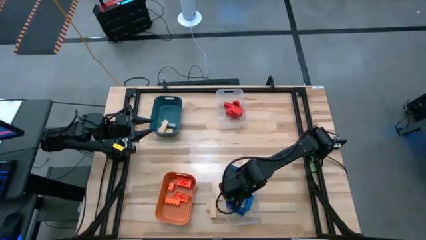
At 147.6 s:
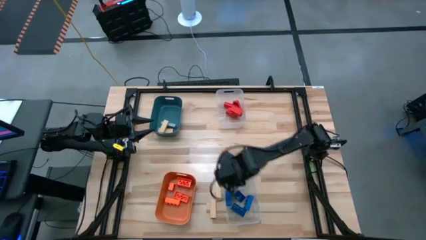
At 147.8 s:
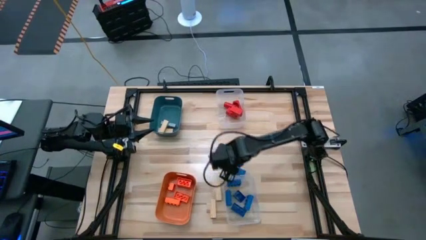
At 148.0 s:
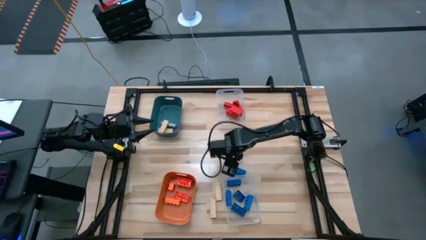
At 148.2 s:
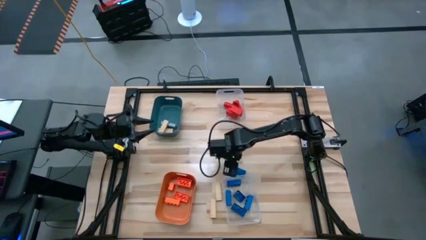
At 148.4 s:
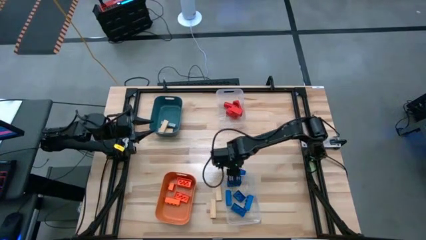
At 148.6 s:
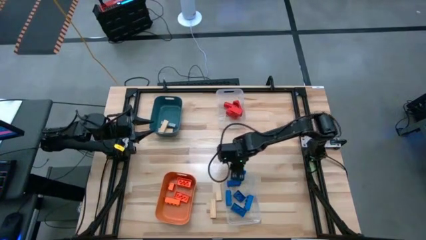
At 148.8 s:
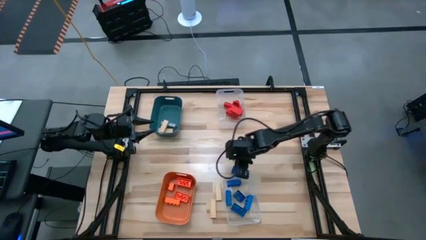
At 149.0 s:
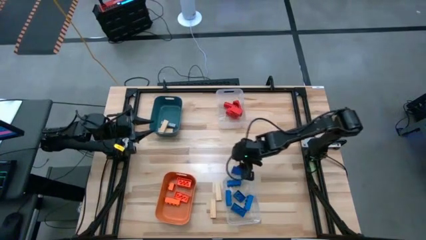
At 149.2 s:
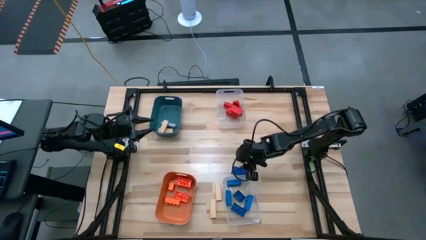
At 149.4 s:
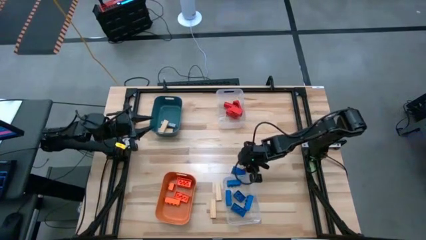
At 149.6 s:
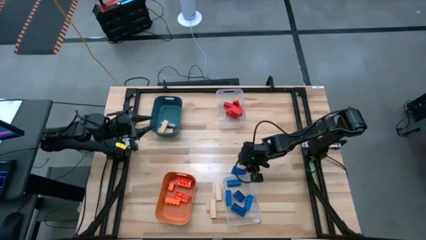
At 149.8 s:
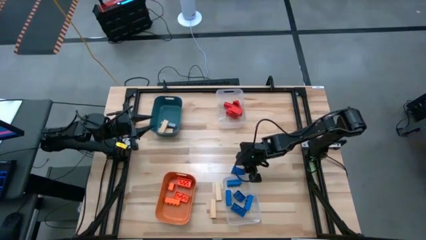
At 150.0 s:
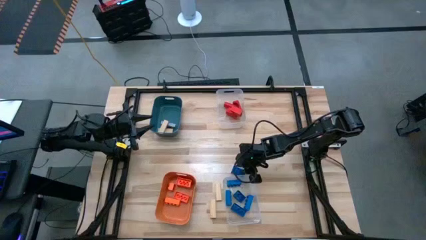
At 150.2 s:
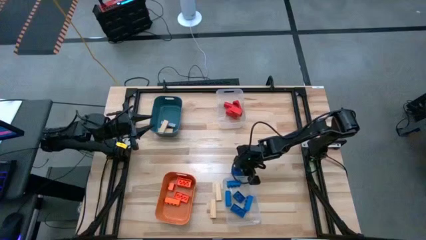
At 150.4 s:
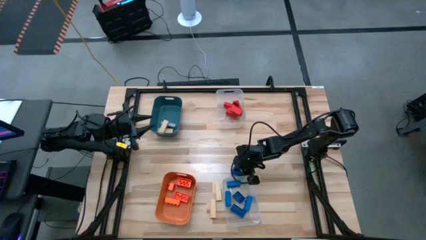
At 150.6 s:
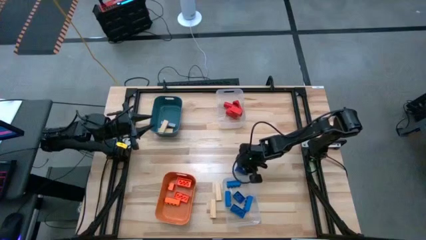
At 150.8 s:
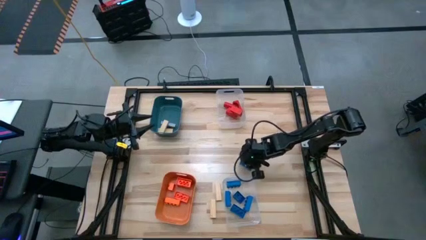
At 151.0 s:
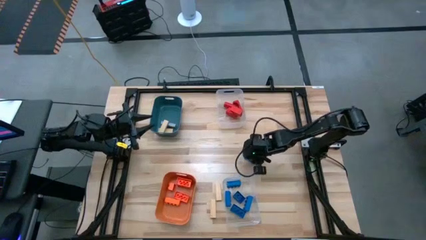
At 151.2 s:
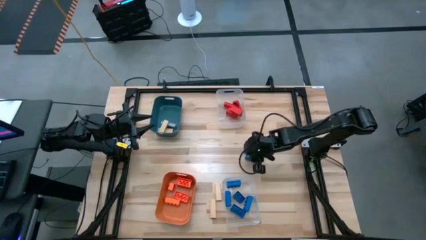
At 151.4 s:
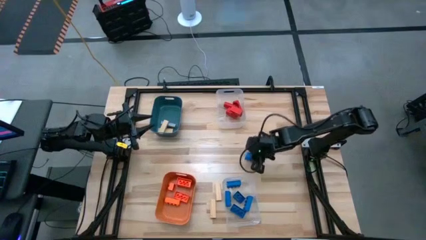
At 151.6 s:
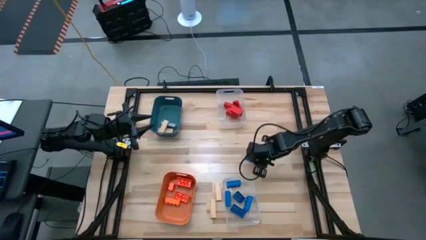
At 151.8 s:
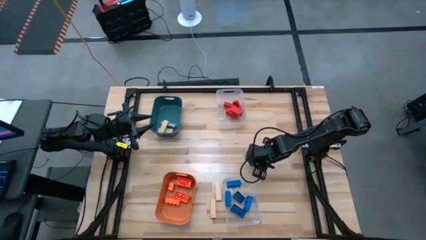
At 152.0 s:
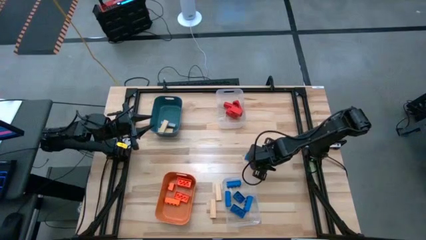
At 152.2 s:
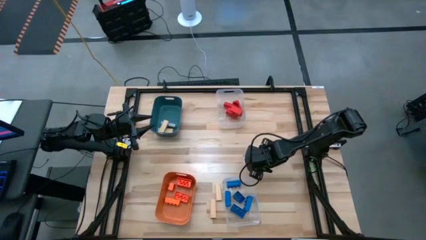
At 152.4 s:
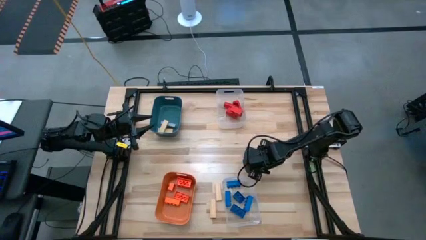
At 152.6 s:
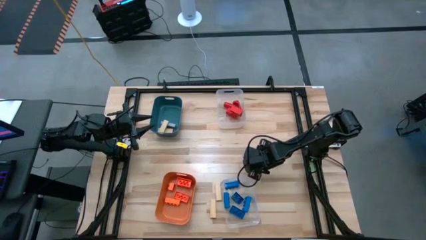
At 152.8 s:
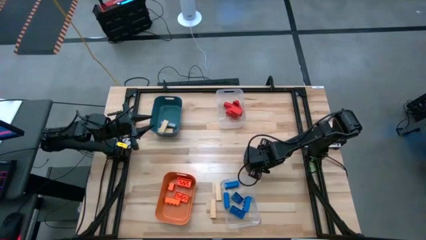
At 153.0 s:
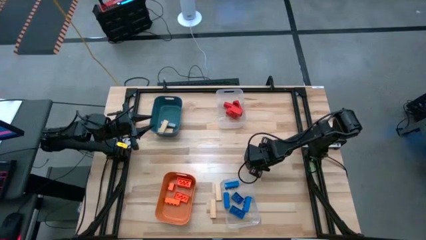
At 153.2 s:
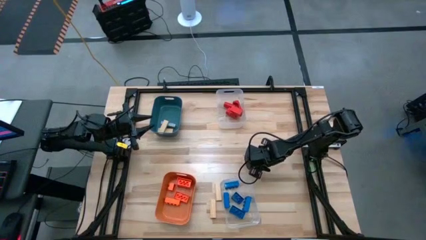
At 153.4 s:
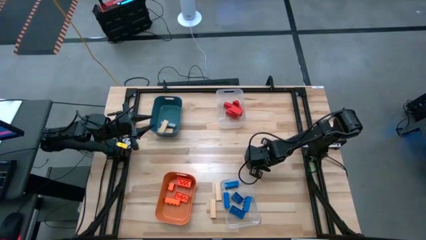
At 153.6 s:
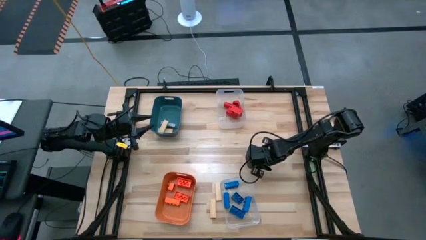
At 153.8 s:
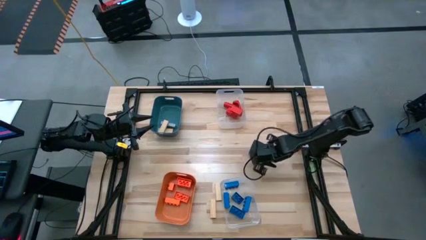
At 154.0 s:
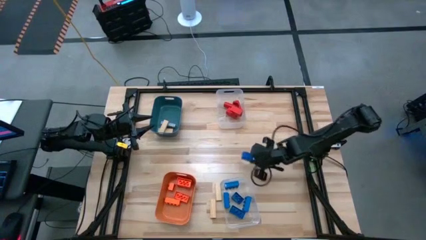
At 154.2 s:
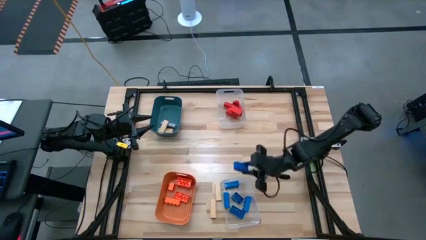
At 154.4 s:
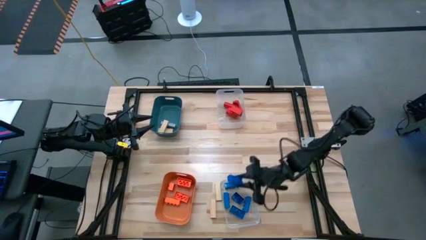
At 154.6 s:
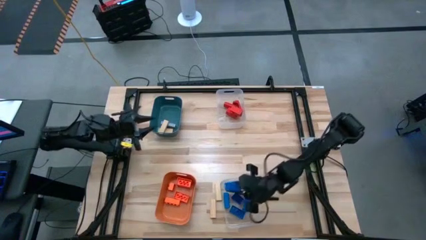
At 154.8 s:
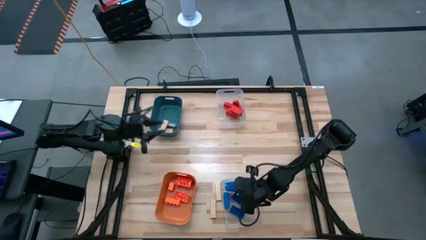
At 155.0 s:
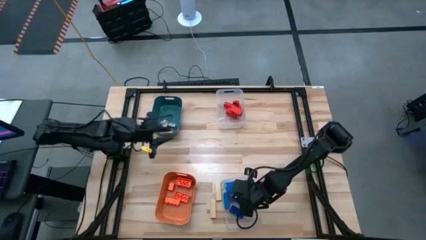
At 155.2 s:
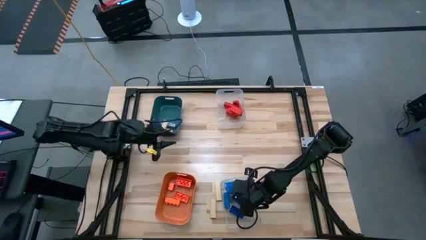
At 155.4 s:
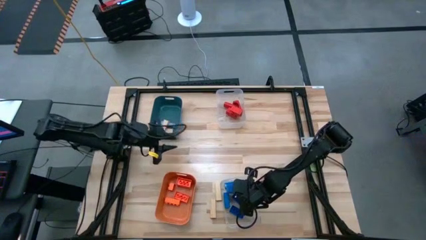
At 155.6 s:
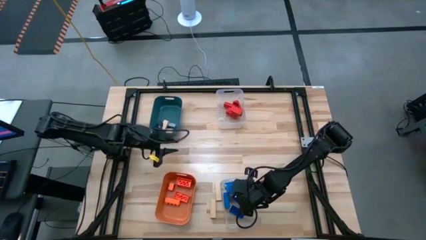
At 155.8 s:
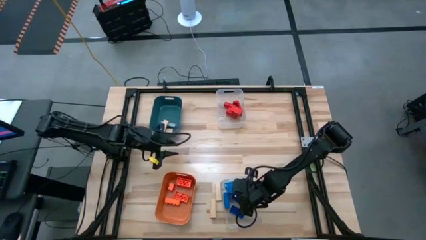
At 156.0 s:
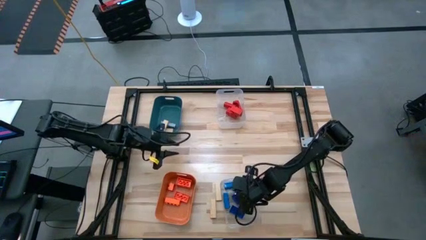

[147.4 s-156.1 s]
Task: Sort blocks
Put the blue game piece into the bottom transparent bin

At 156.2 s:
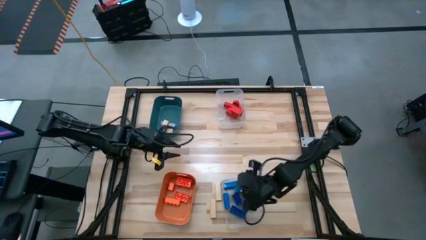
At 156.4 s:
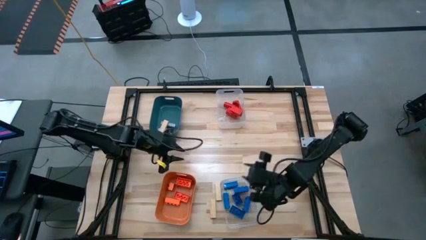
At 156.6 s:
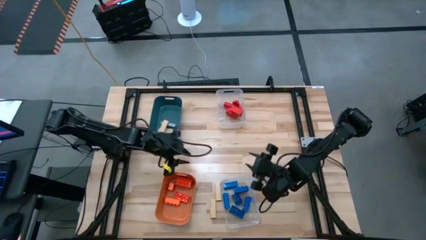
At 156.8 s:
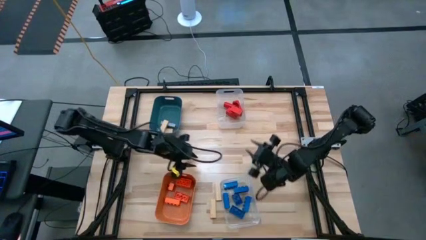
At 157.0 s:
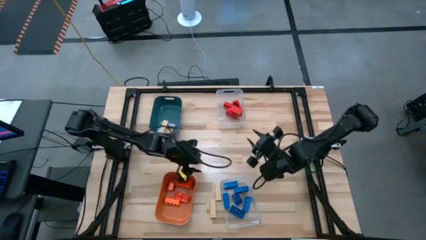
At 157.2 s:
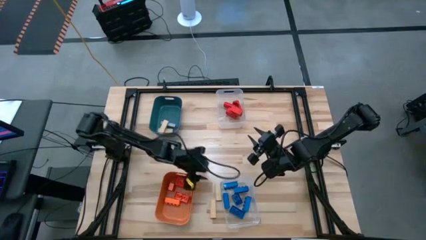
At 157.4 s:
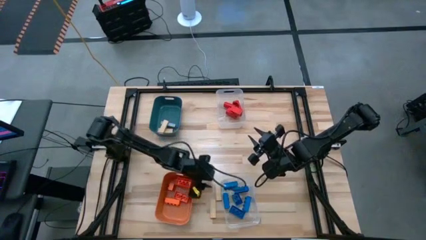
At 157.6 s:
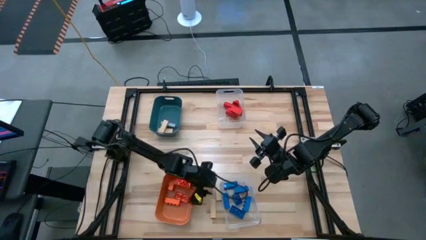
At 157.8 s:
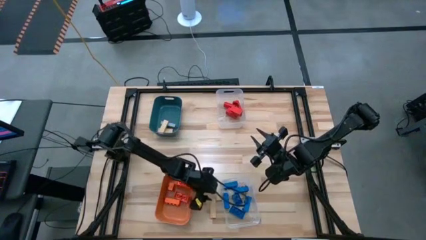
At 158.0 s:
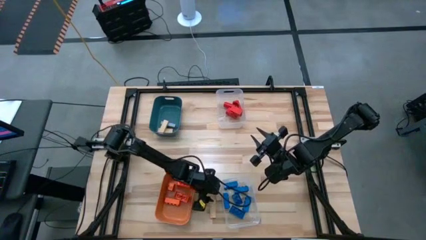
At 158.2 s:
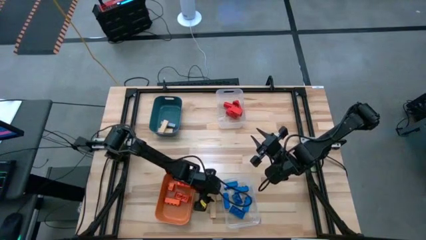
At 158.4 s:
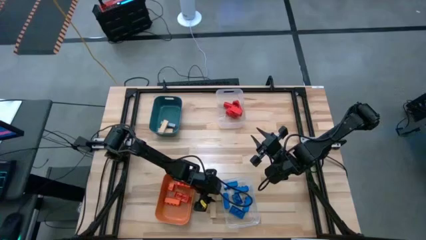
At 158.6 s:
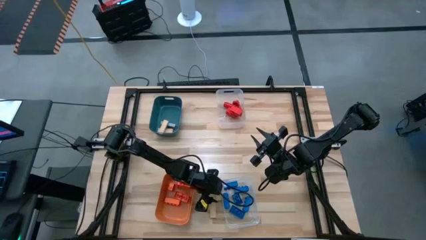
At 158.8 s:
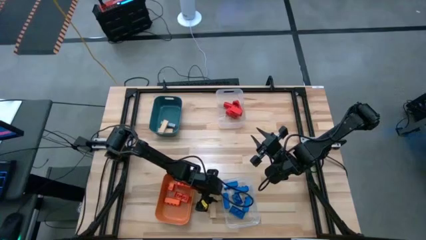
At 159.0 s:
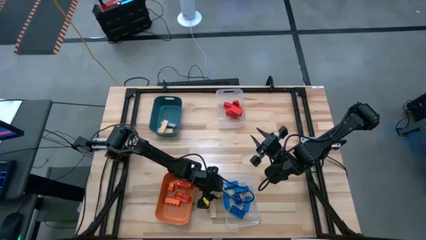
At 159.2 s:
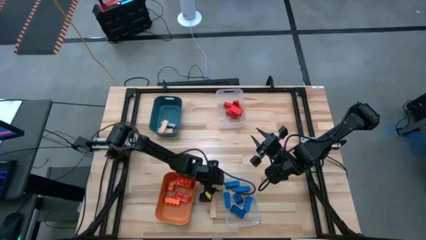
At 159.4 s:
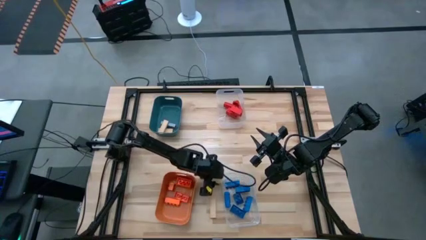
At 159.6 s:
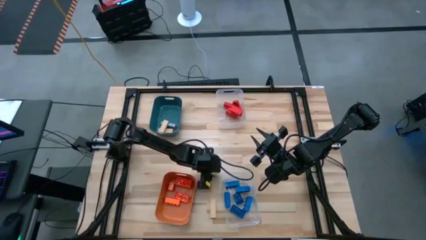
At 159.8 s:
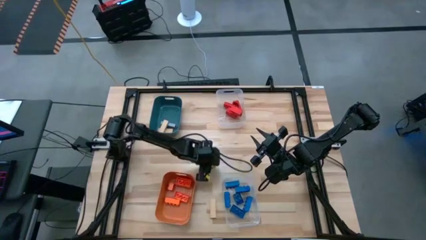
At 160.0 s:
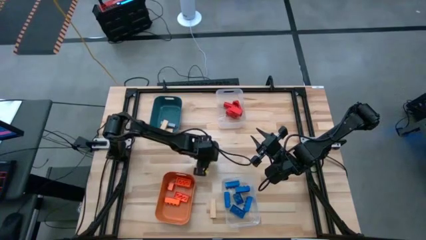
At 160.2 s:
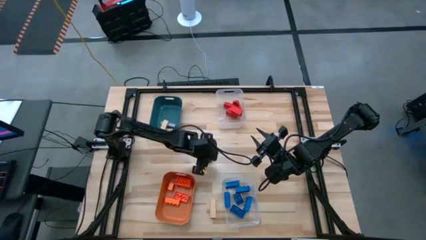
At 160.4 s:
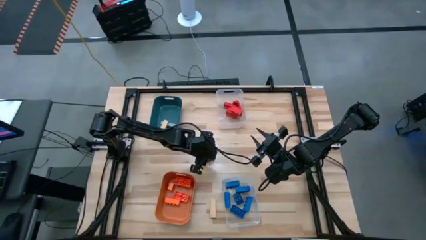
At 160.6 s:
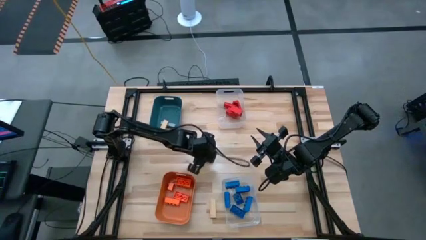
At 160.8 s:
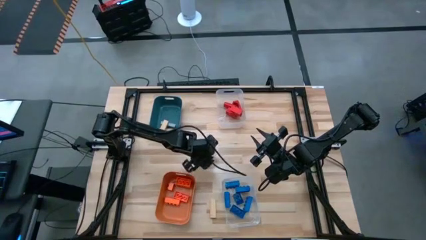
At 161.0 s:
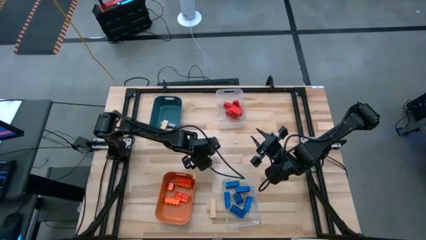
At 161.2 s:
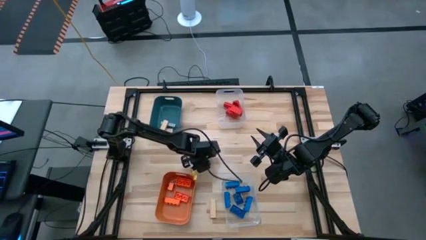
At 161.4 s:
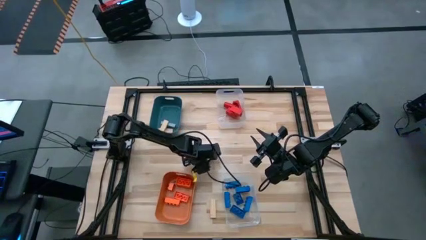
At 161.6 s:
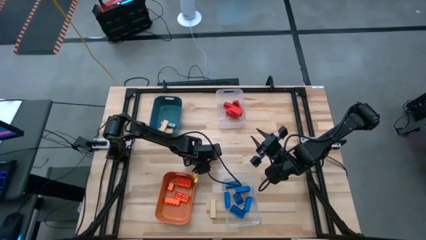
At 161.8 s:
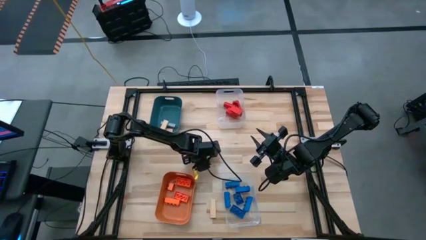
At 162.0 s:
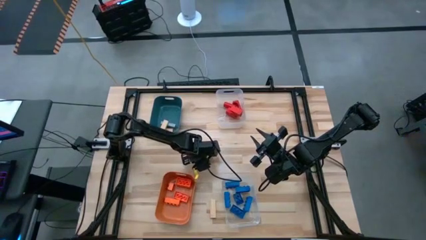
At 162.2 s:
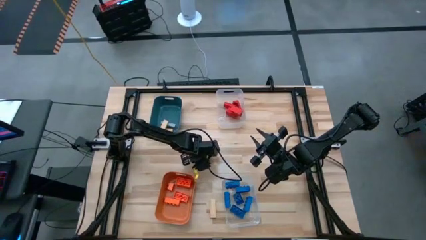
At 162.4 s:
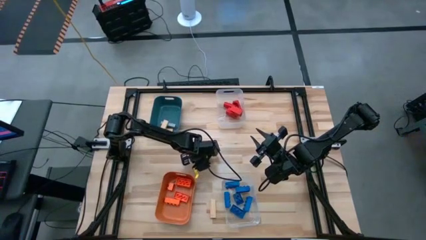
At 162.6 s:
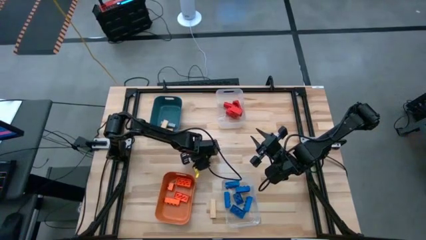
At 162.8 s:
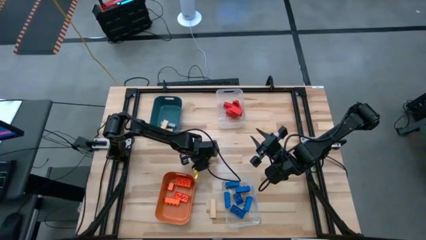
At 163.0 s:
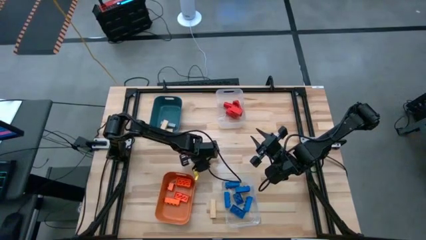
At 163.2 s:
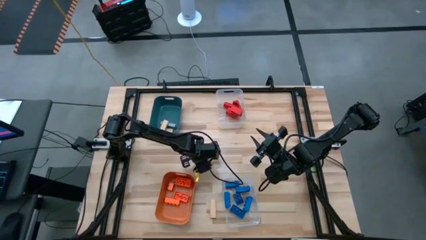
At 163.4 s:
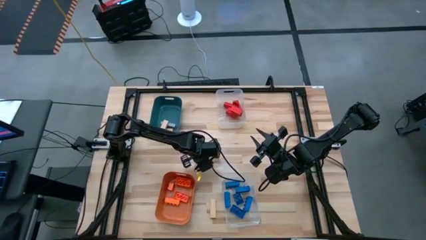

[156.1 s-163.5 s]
Put the brown wooden block into the blue bin

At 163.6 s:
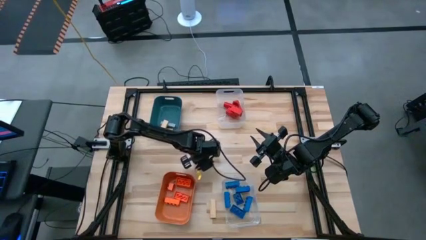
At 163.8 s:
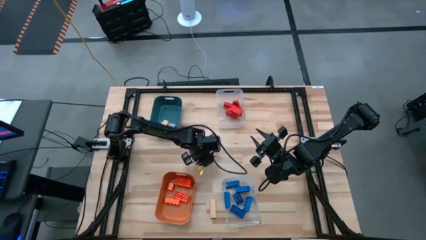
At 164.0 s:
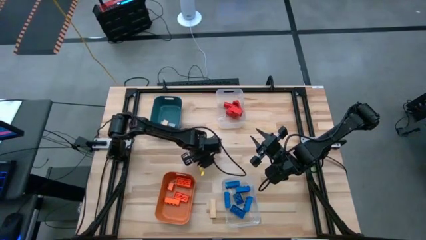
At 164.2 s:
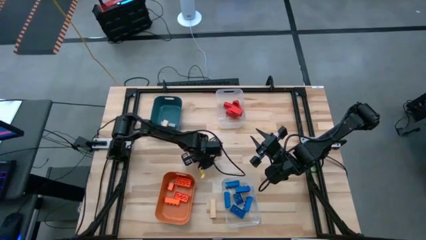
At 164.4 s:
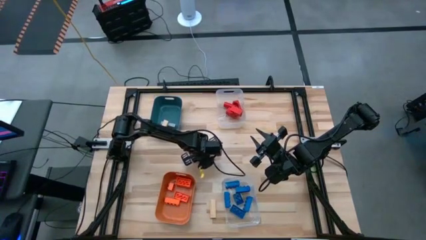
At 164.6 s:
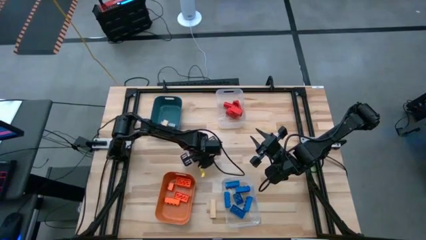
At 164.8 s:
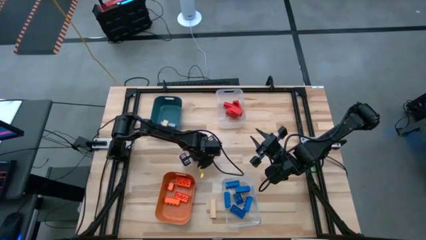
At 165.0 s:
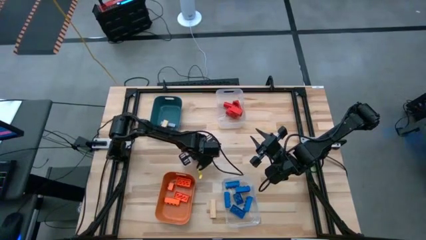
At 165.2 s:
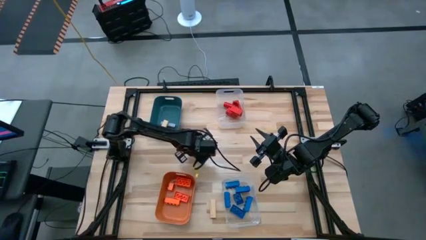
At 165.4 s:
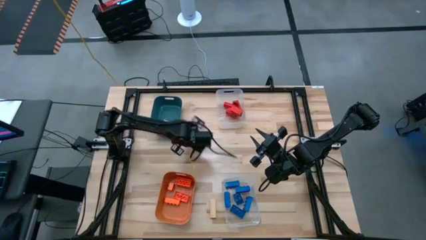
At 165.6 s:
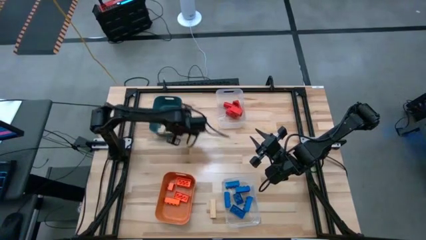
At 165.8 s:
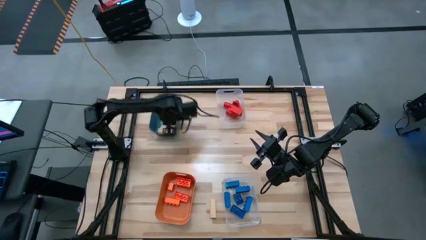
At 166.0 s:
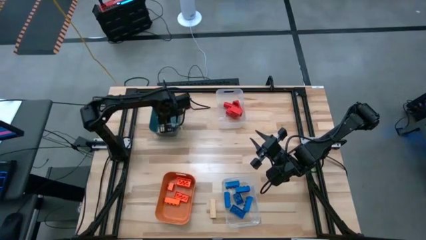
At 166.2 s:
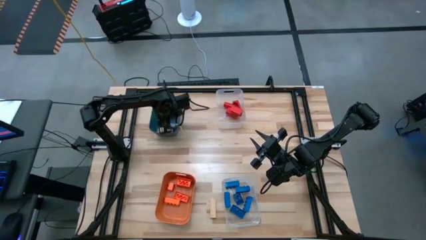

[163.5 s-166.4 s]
Put the brown wooden block into the blue bin
